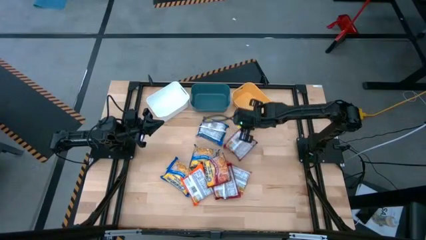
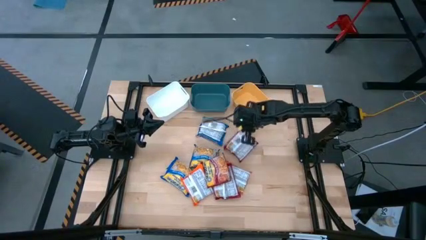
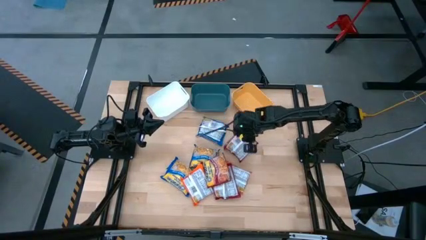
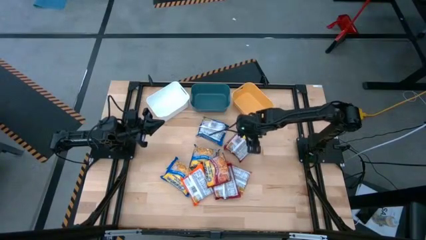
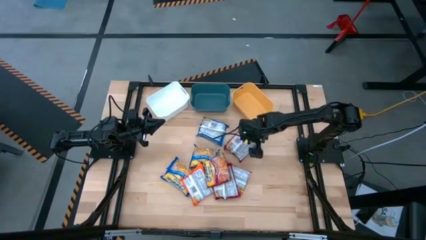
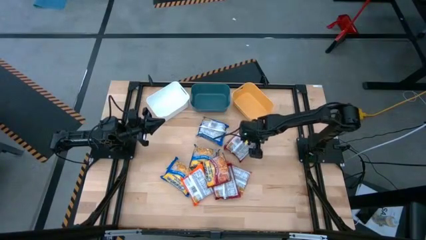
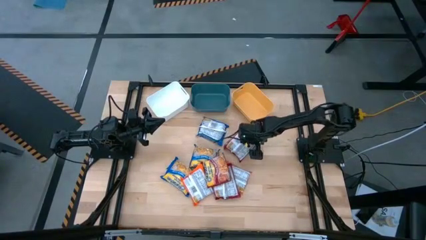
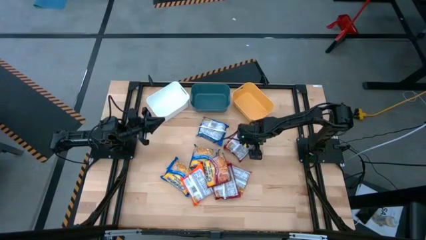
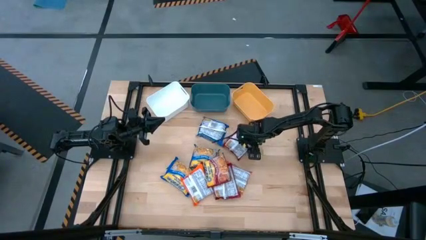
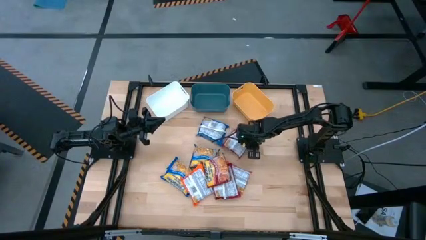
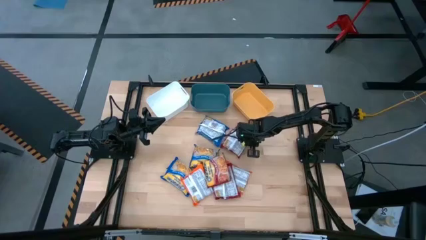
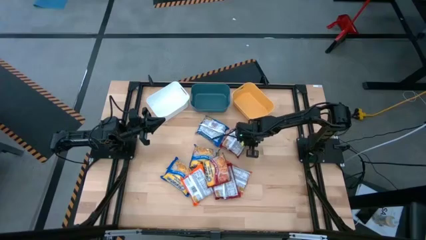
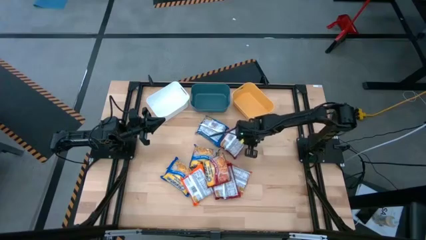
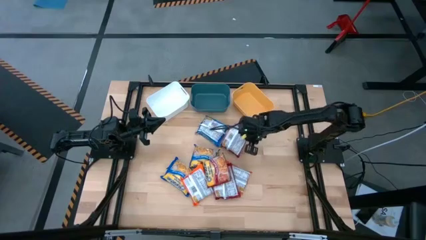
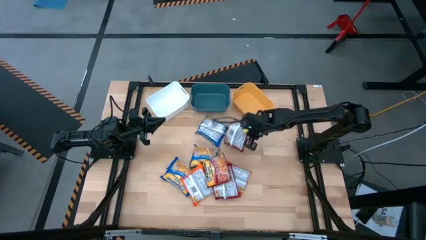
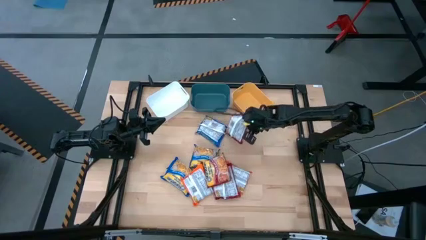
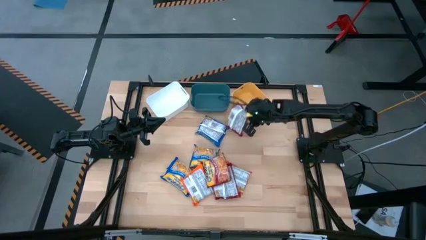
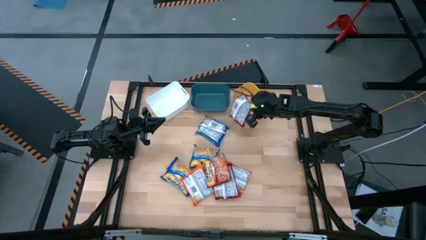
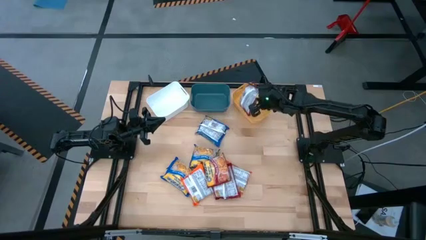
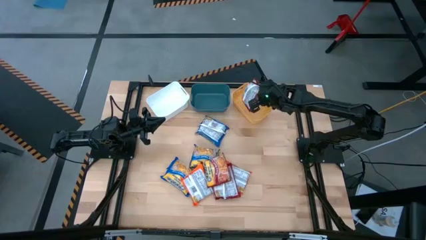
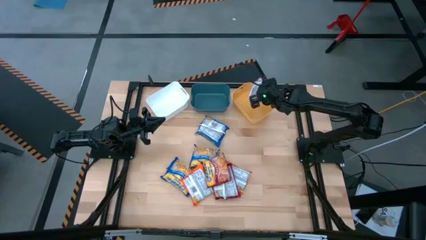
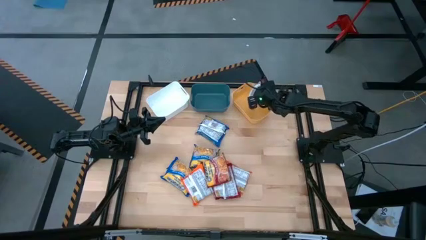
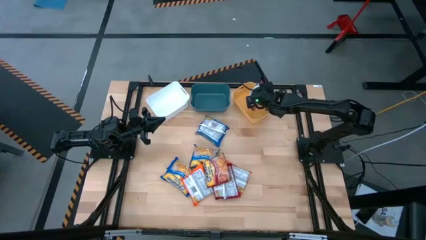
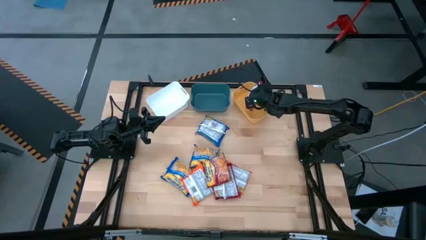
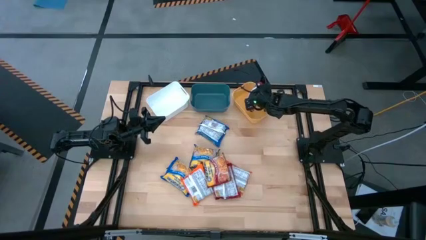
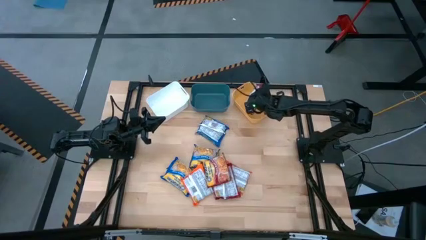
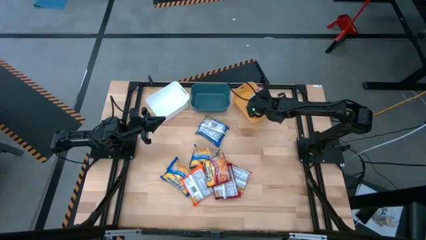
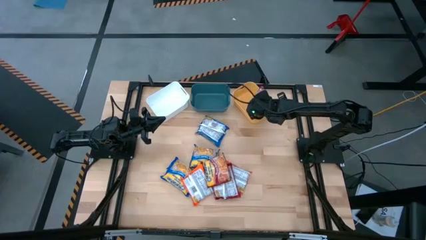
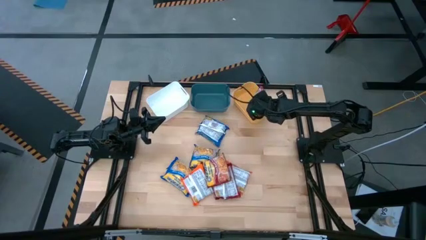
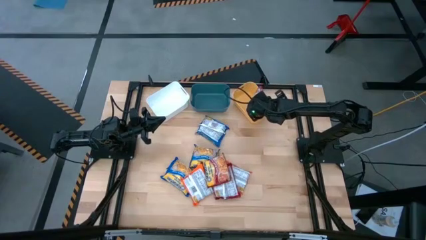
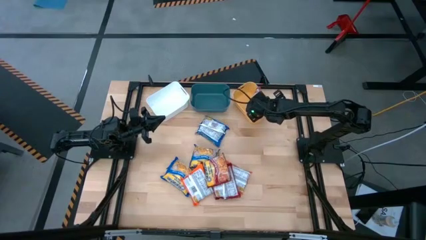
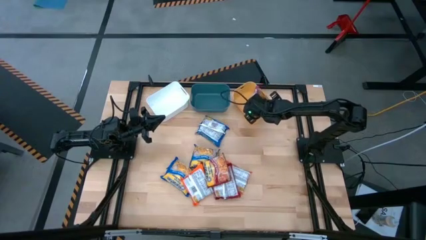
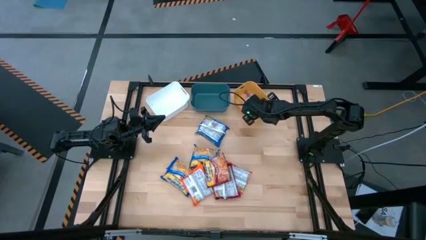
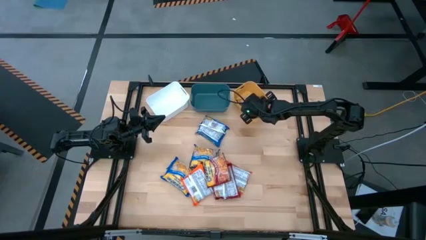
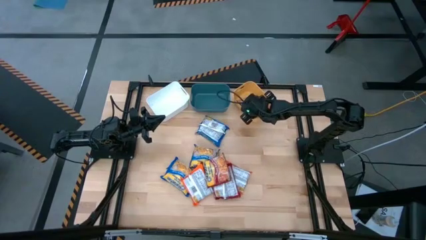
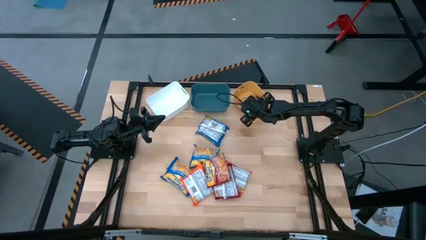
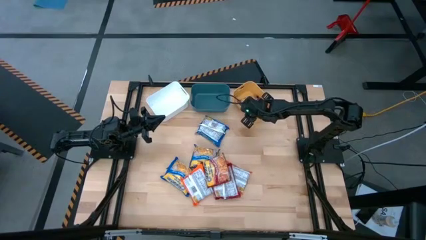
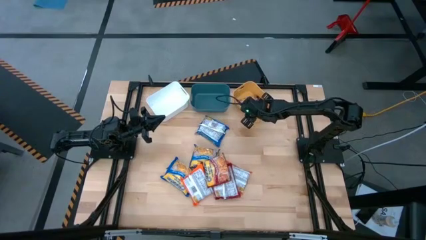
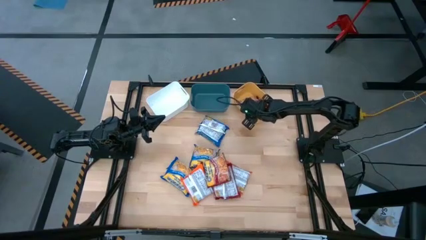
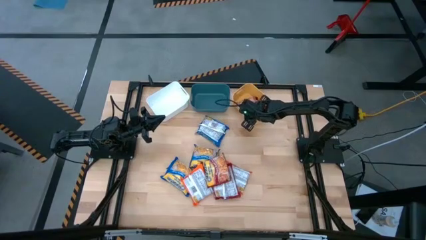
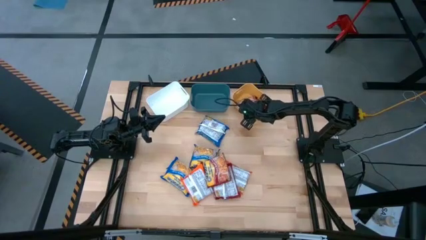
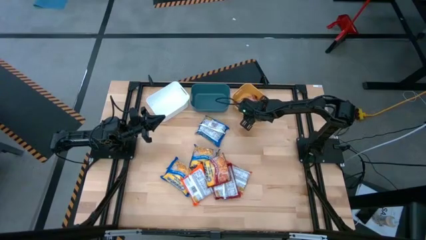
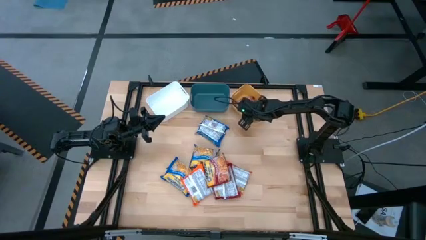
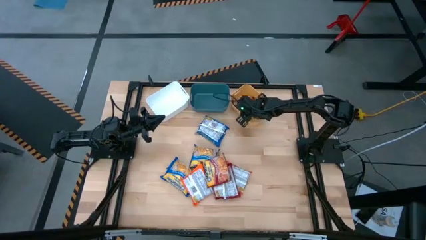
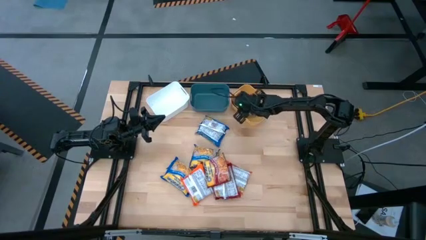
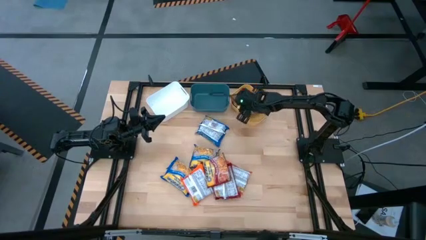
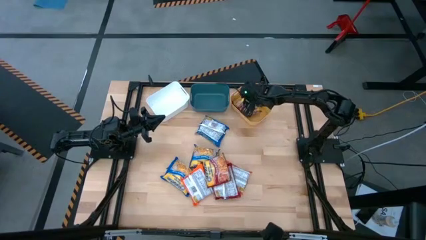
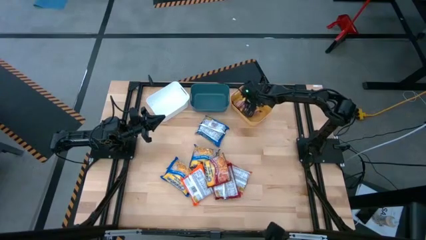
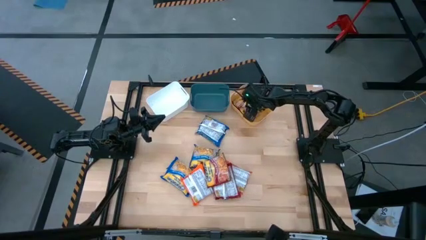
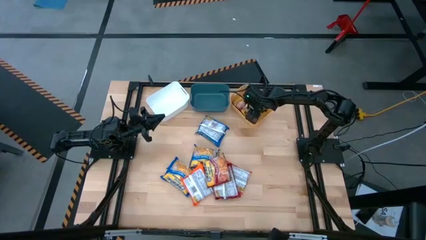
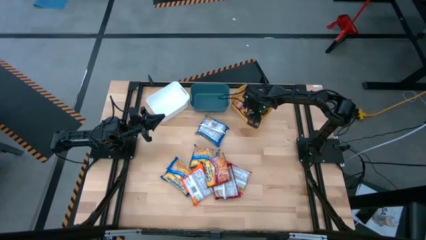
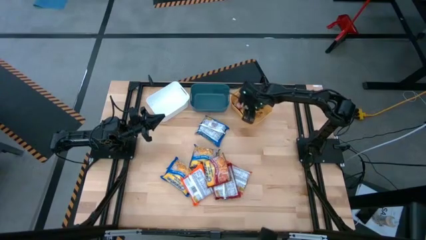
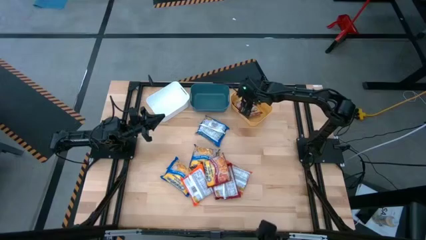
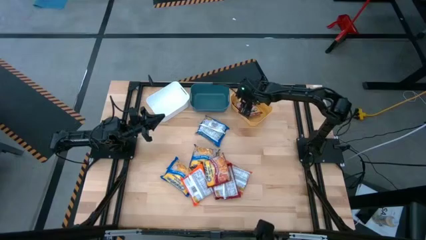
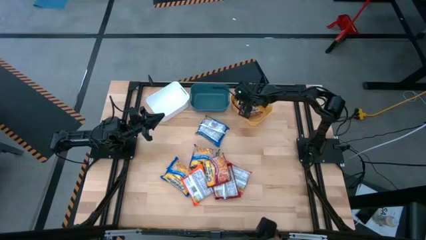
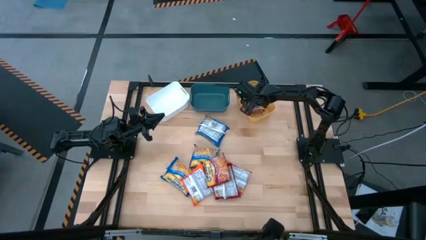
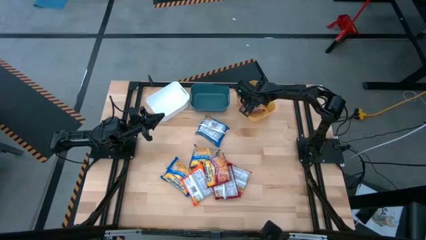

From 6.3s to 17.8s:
Task: Sort Maruchan noodles
Put the top red noodle pack into the yellow bin

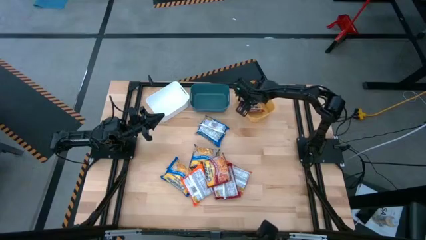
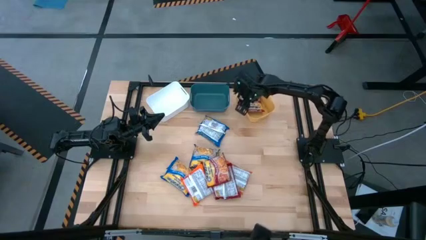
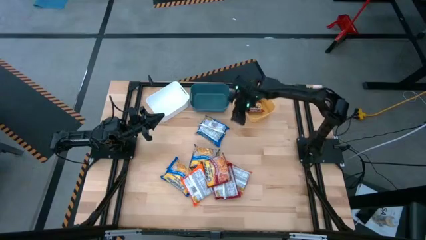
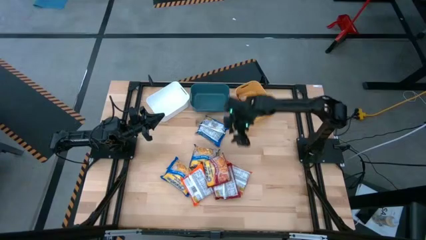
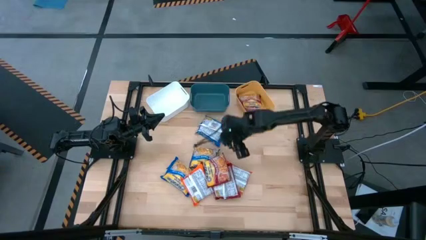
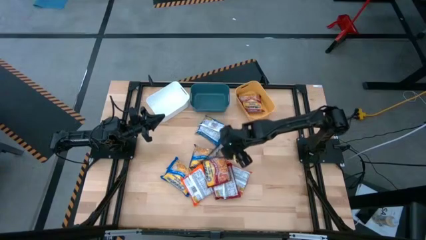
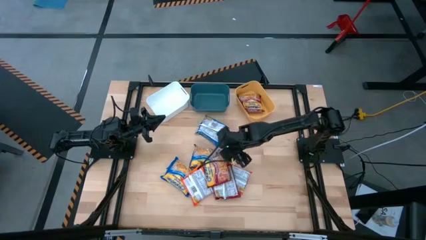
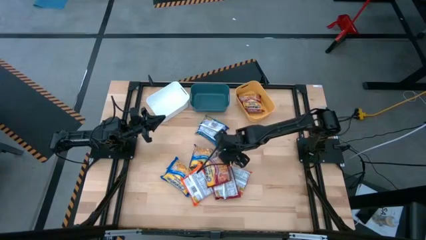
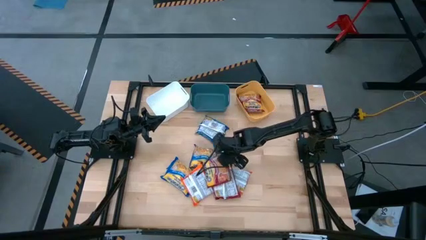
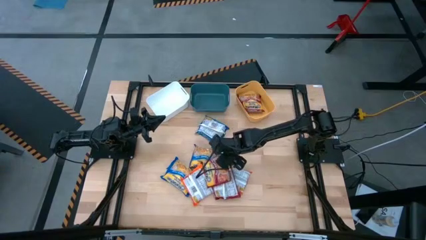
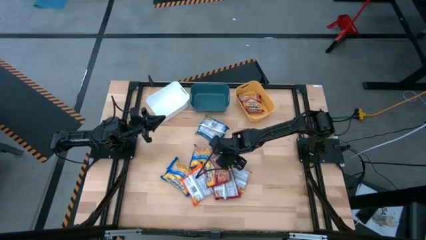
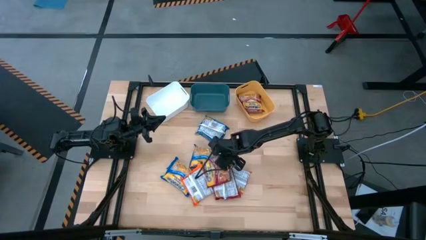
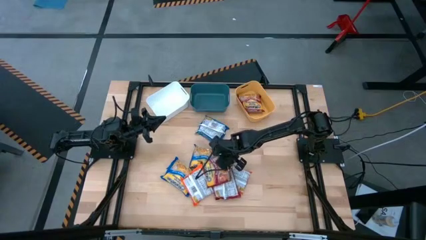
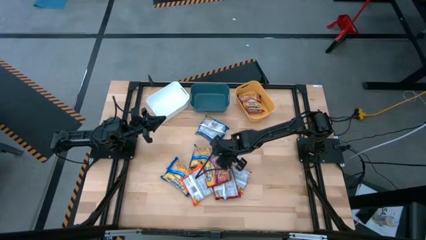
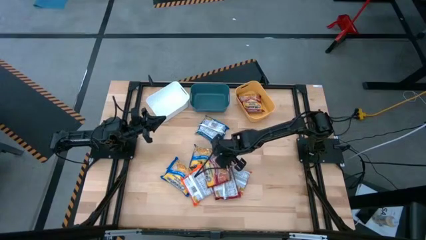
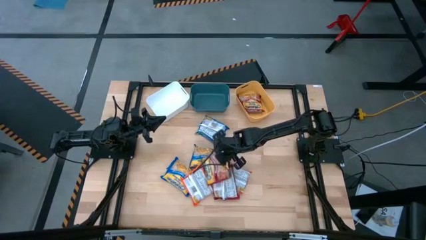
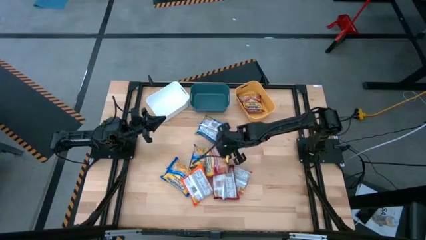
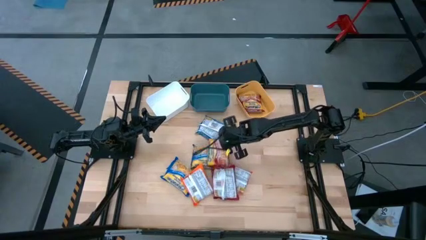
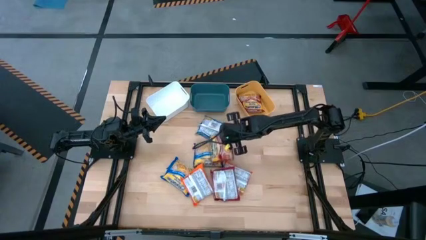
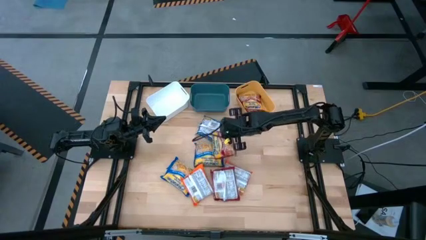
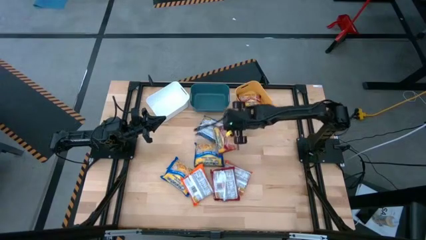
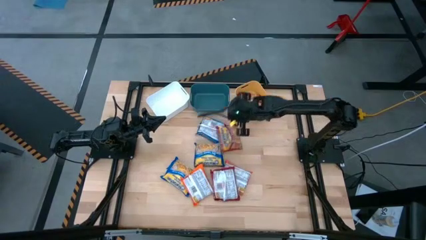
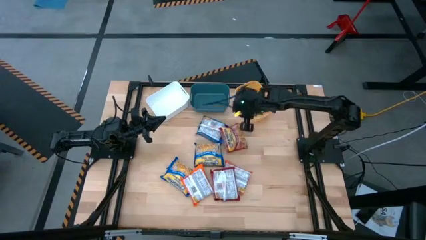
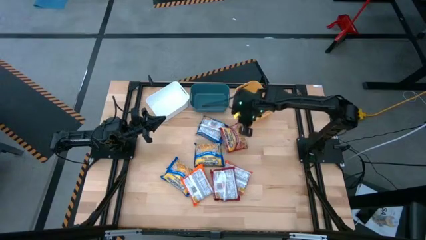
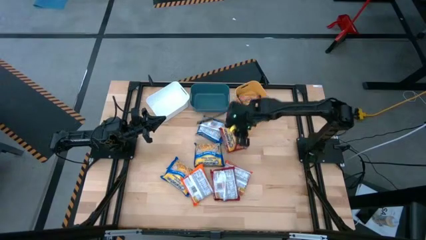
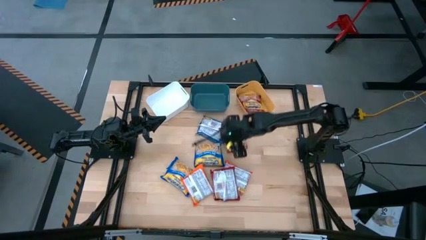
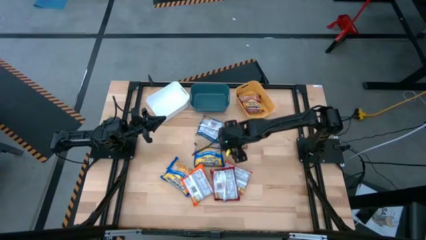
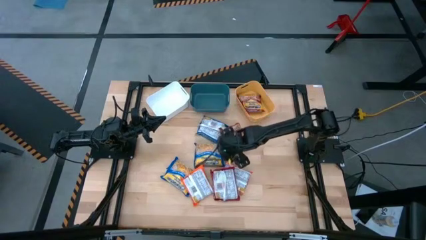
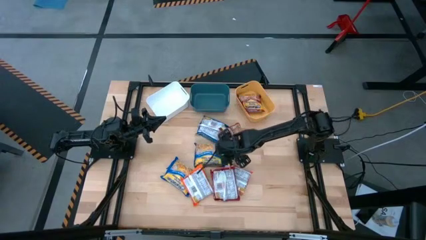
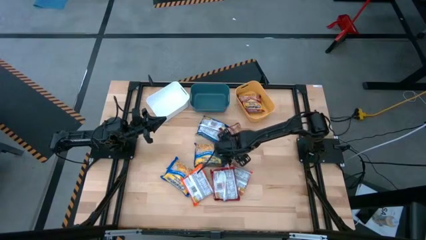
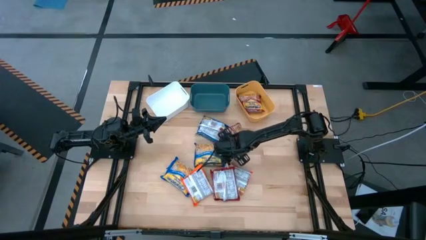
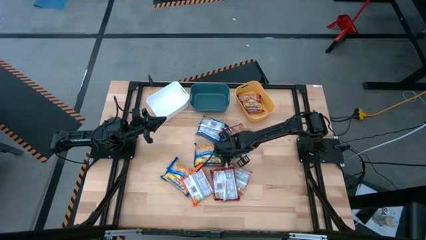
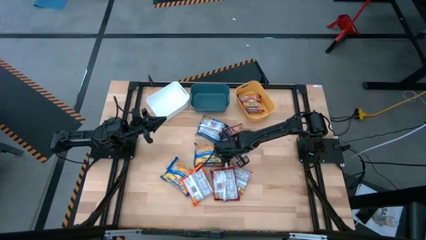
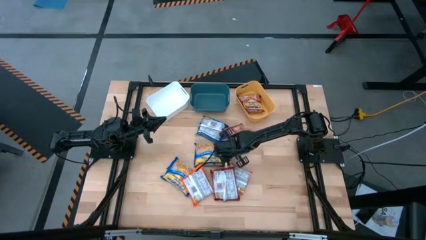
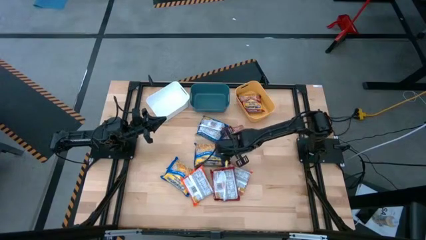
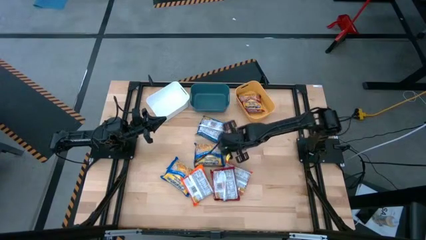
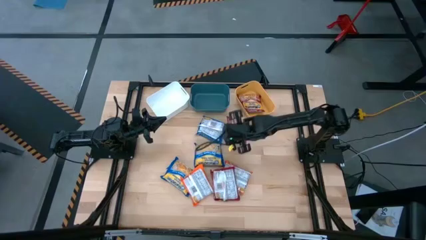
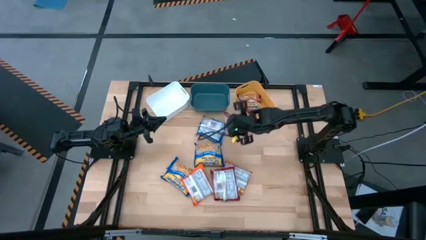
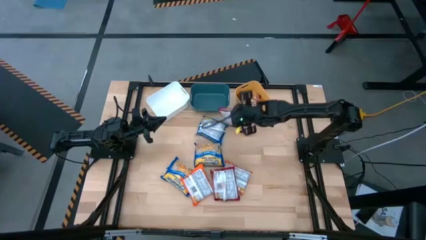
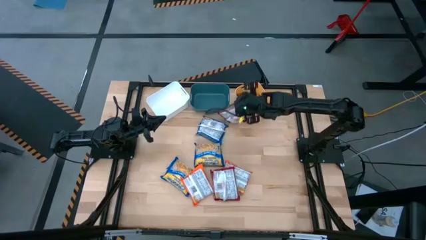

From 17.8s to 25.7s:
Put the top red noodle pack into the yellow bin
